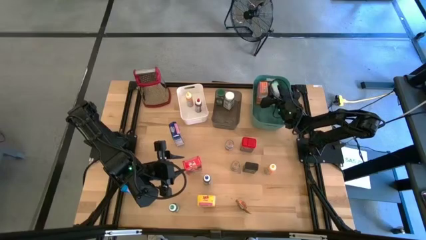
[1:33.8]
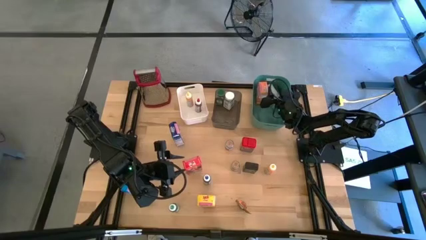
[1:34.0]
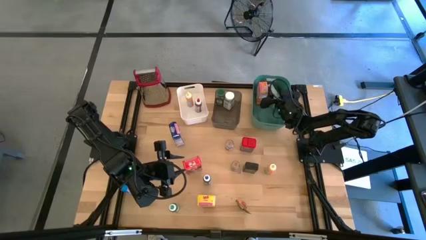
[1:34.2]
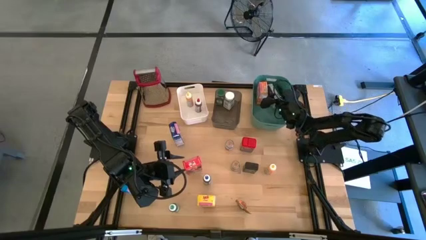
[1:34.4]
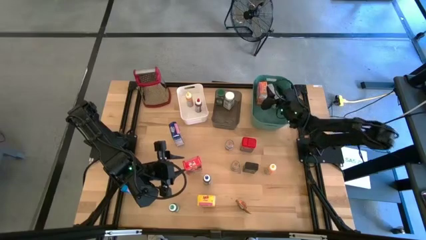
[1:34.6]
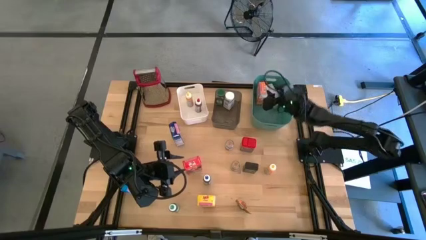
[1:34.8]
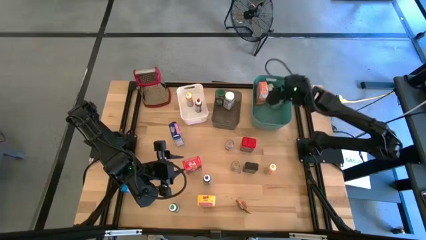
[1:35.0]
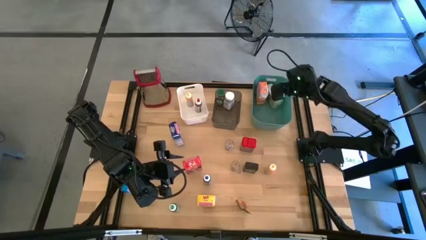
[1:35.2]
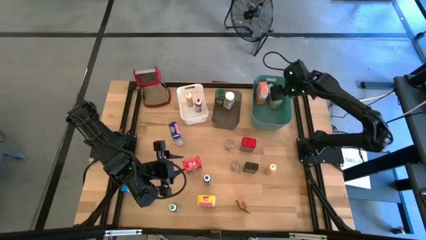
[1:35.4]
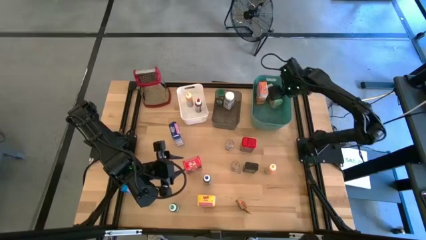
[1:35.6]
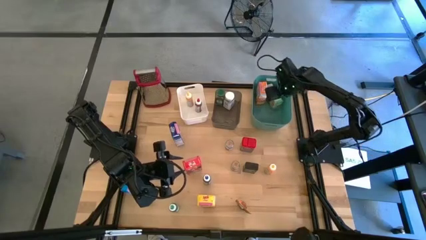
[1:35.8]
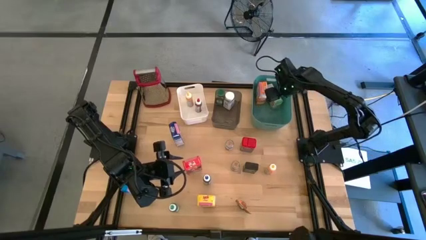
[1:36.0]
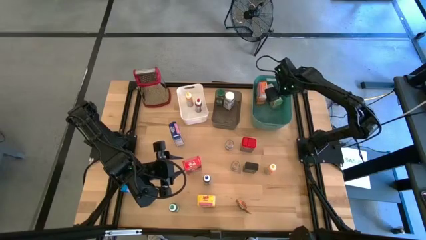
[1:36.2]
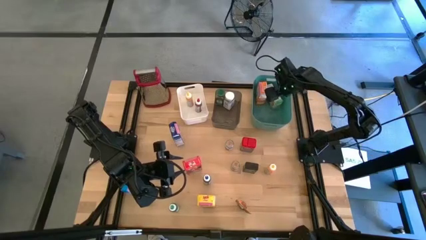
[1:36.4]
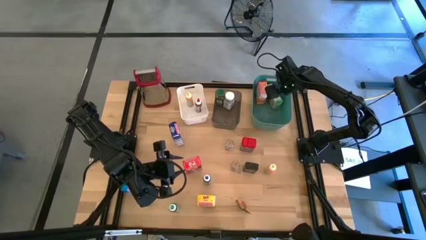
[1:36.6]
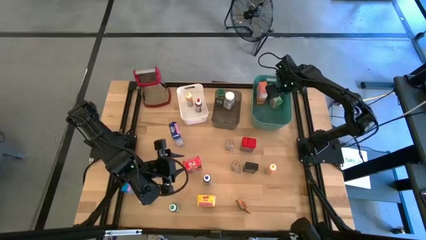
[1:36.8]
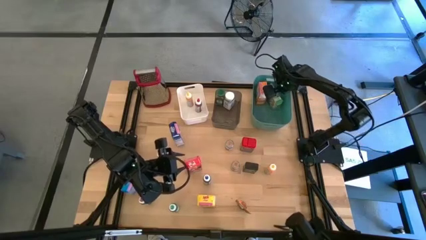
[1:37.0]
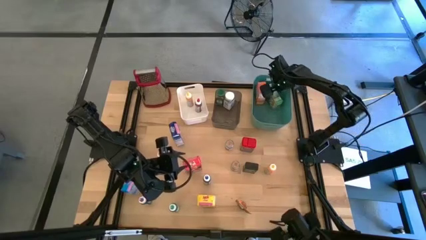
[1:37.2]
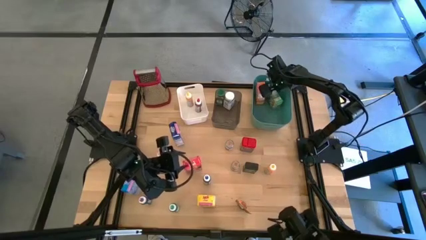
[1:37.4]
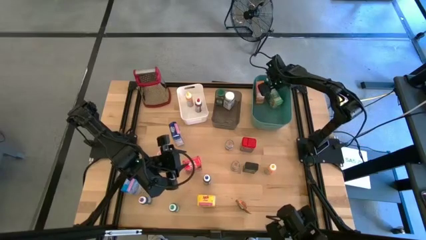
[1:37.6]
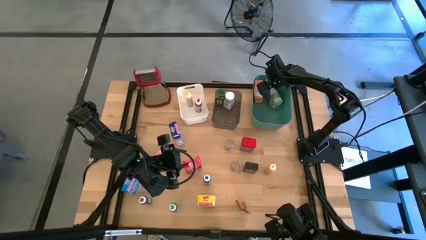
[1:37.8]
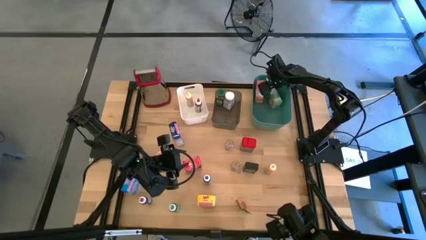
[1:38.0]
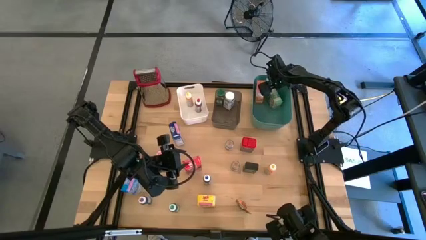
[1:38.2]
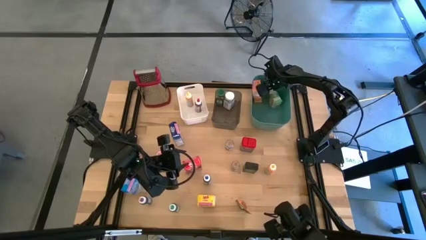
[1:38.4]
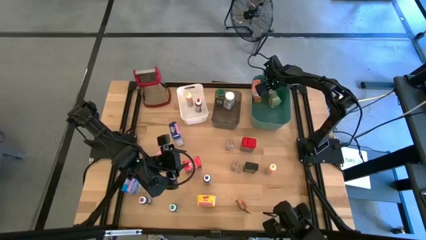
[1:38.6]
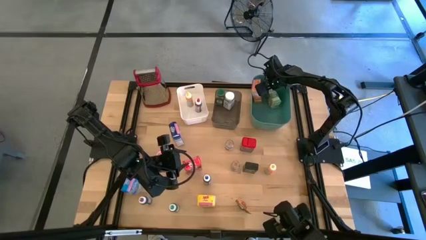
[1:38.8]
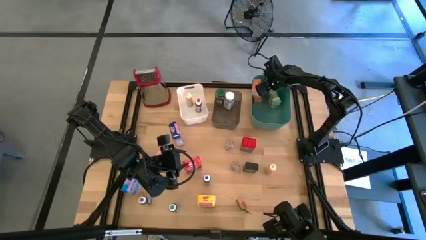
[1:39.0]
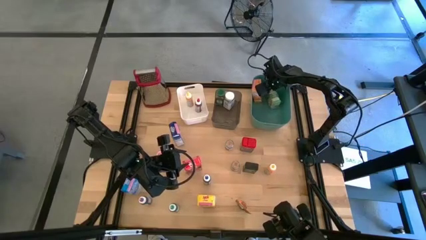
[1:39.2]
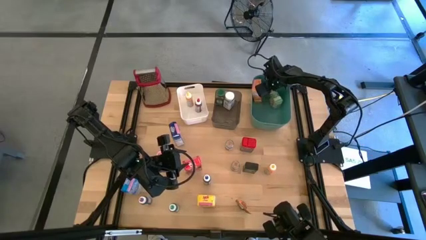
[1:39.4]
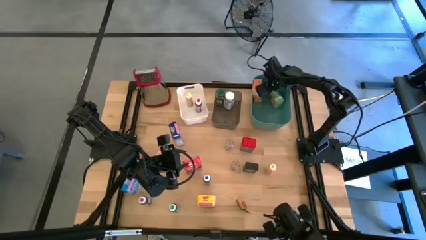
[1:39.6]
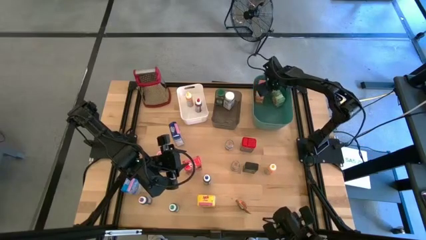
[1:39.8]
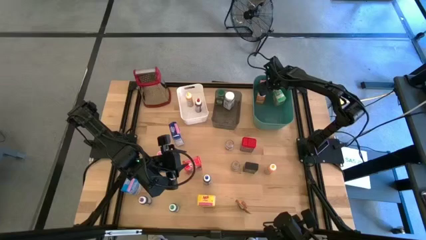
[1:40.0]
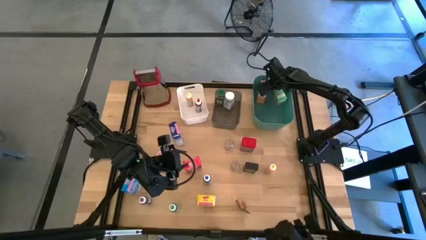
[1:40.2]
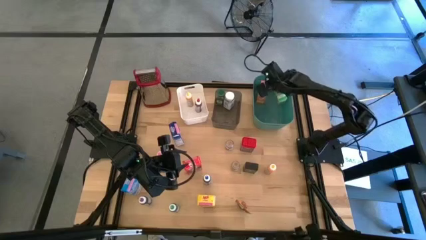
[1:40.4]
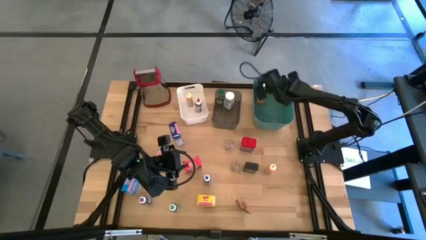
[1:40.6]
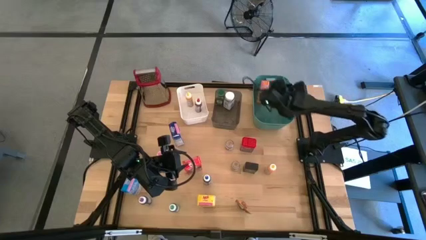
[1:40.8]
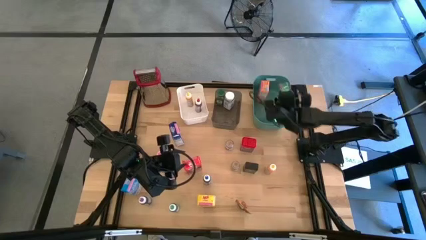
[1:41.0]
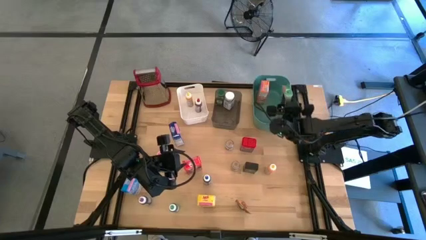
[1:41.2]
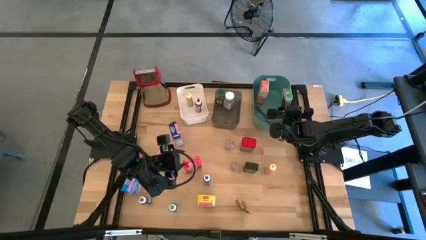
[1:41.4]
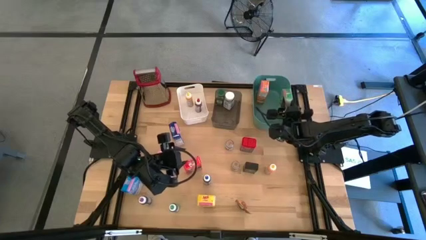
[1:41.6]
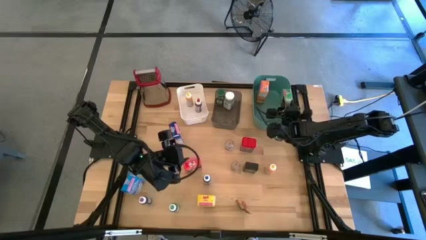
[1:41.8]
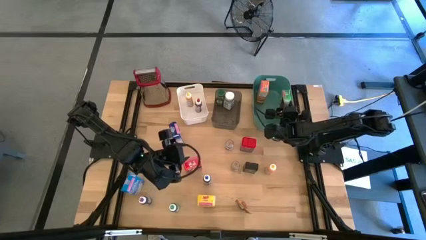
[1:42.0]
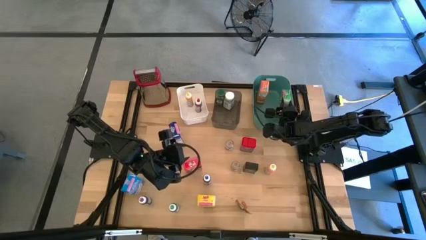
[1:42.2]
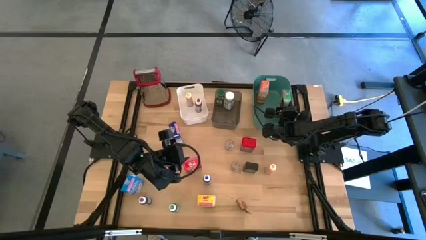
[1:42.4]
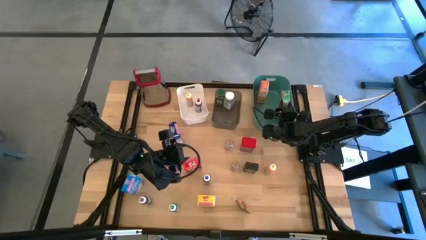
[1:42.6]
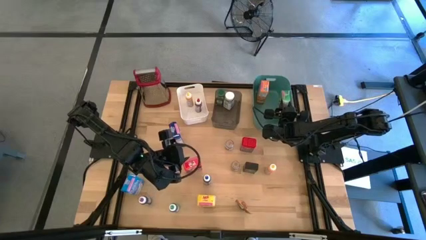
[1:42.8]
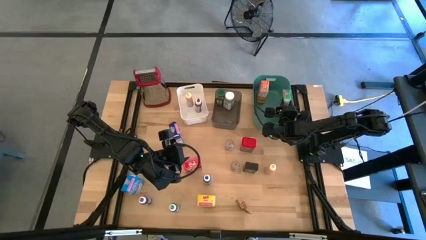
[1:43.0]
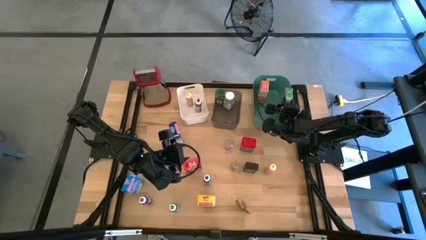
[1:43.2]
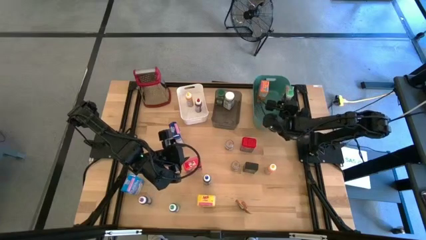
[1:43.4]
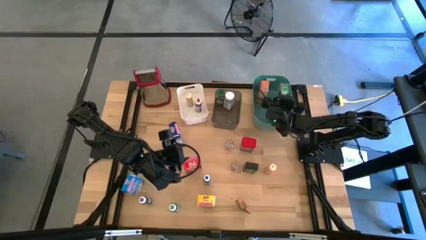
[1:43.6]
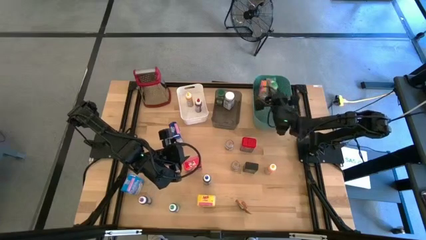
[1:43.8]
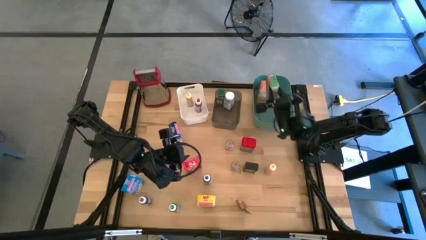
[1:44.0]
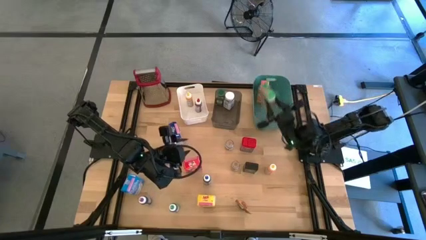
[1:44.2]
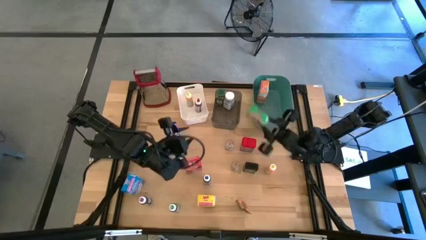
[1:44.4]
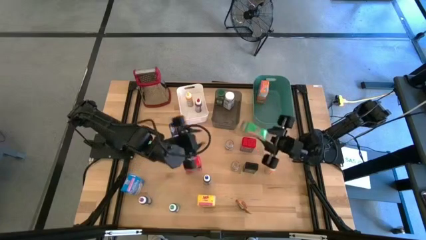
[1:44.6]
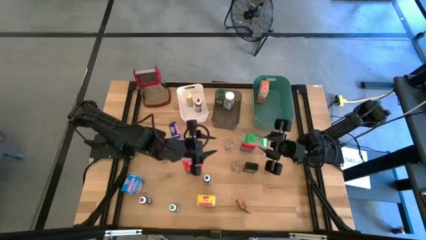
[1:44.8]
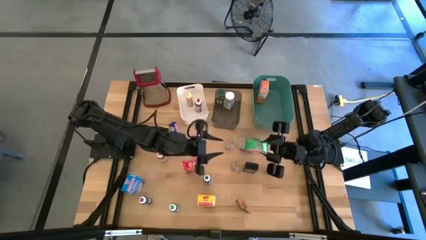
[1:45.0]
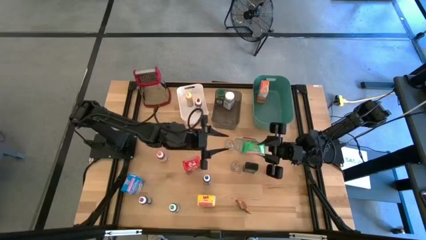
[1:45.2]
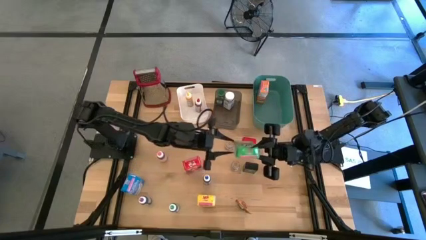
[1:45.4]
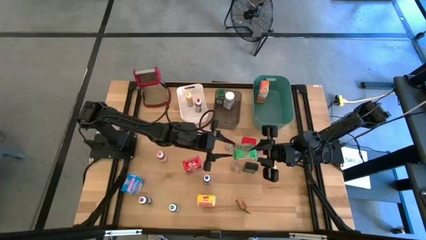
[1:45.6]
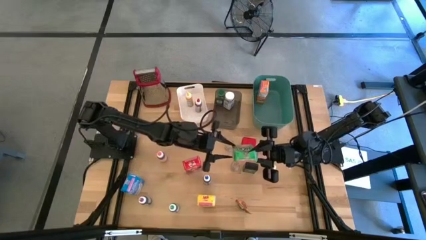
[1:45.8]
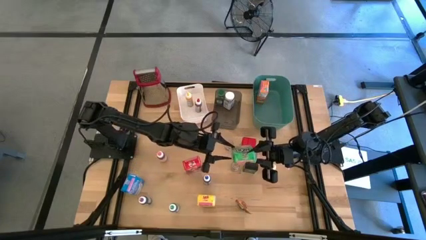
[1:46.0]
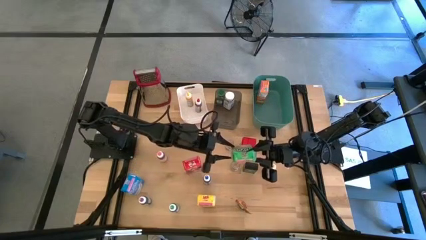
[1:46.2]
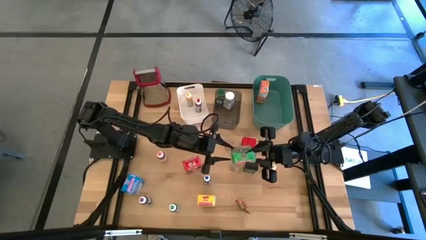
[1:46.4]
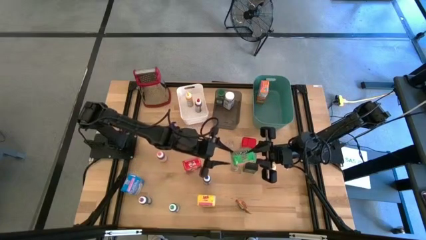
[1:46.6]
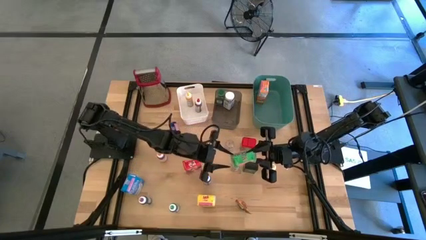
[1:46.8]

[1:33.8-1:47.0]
Task: Pick & Place Kitchen Items
Put the green cereal box into the green bin

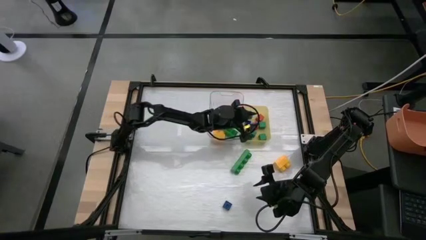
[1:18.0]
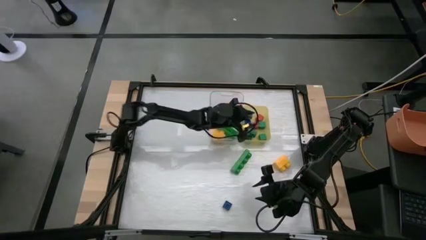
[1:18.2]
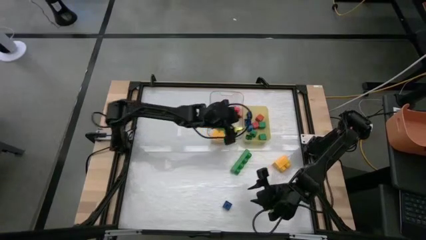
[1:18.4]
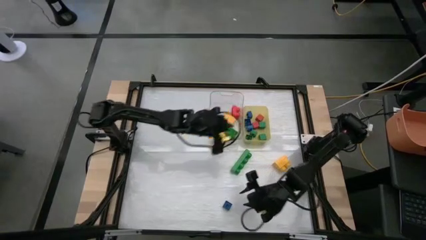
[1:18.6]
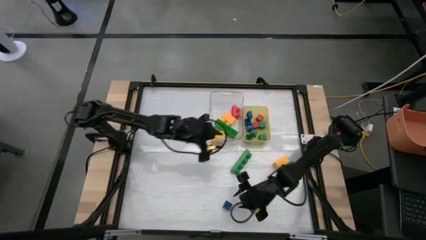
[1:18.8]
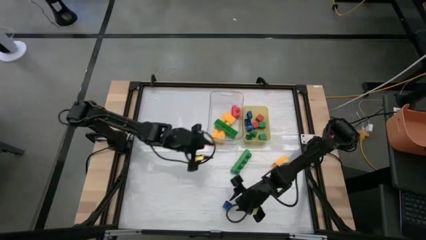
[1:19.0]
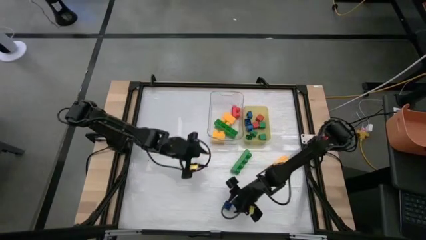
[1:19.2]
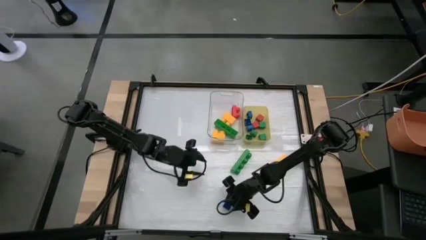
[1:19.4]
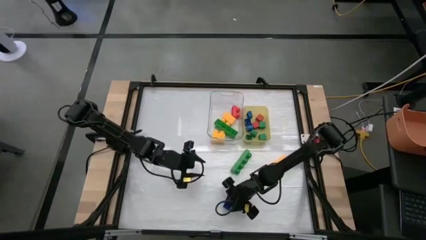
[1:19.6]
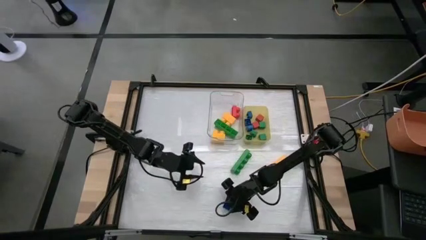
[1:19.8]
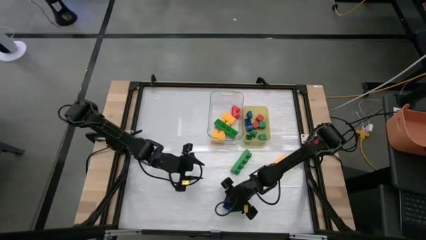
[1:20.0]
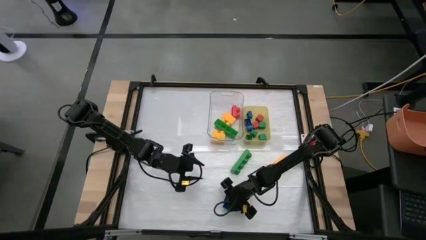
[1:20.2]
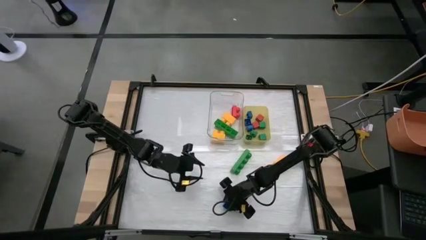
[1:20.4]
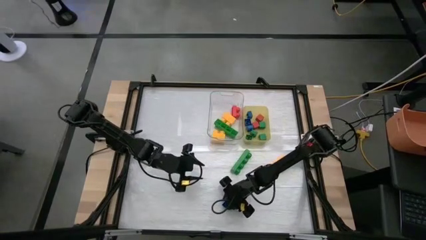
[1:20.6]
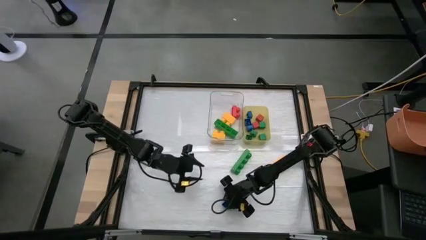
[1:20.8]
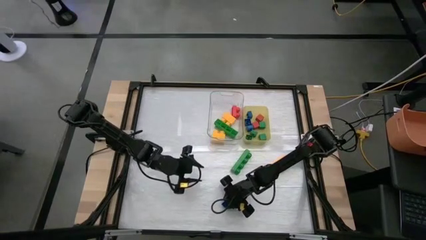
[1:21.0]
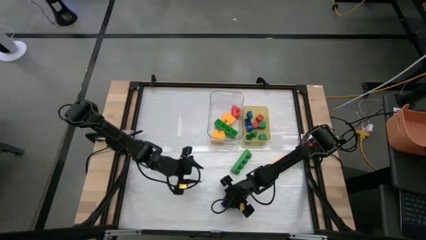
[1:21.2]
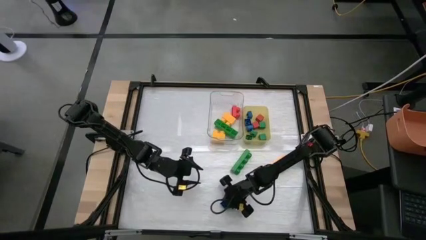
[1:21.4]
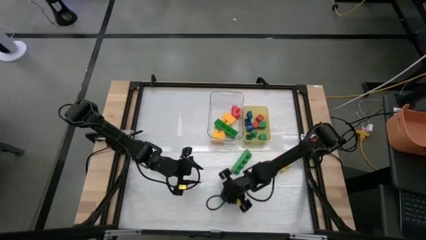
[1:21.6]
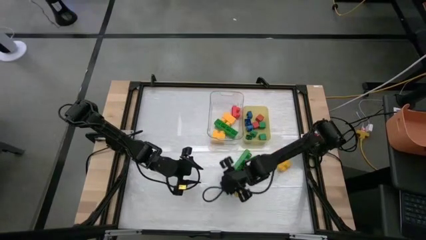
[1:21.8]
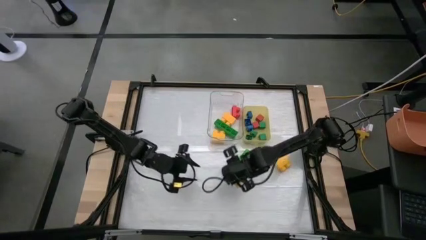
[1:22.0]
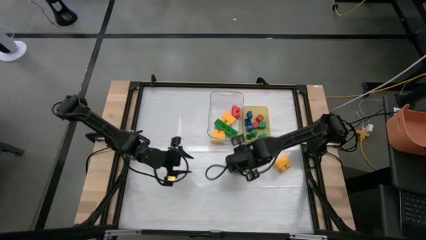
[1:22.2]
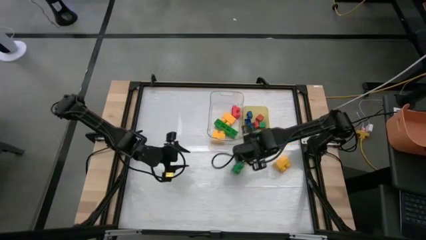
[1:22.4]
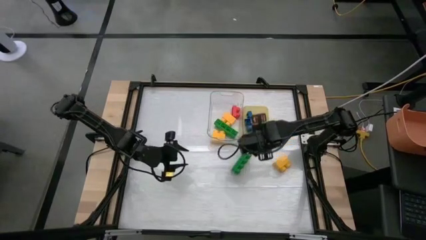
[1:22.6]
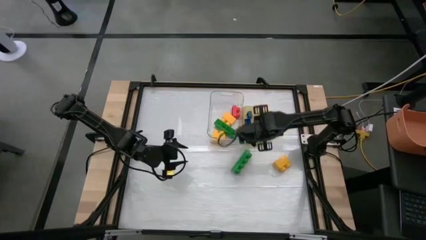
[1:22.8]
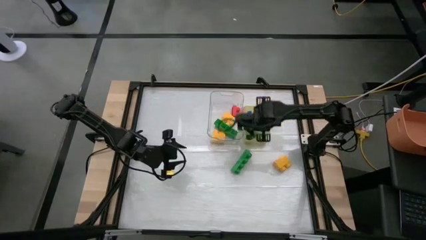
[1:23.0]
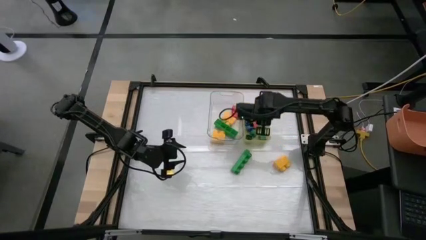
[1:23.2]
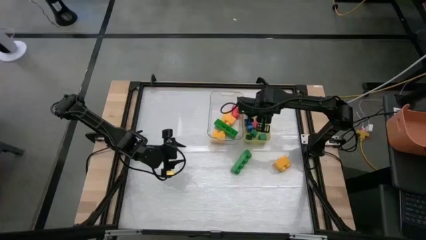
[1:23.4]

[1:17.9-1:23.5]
Task: Sort blocks by size
Put the small blue game piece into the yellow bin
